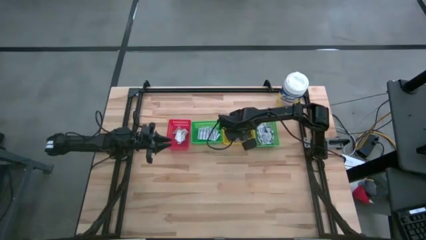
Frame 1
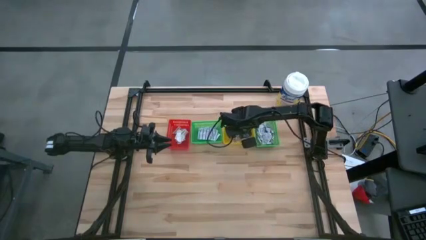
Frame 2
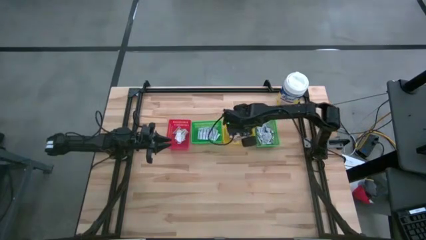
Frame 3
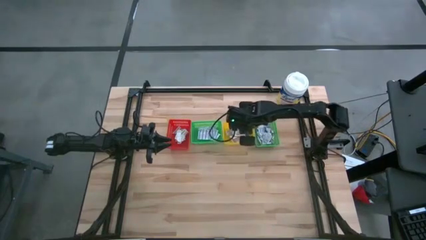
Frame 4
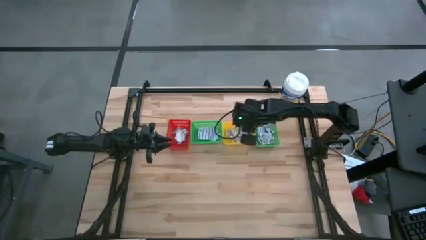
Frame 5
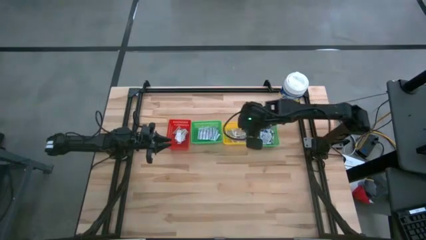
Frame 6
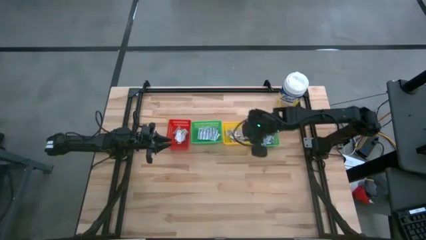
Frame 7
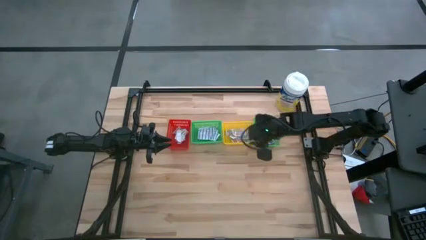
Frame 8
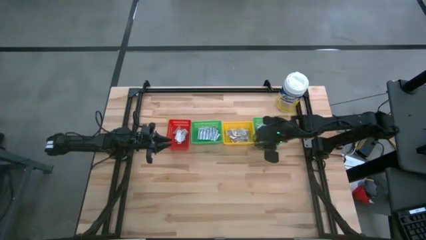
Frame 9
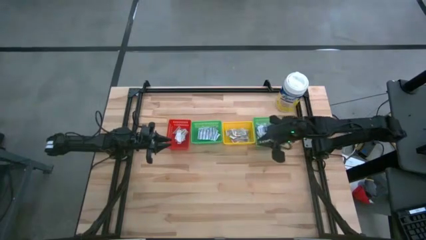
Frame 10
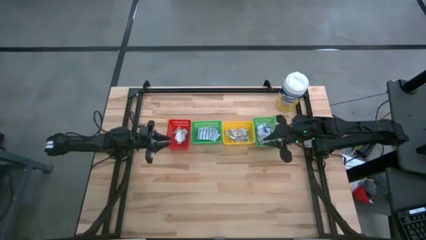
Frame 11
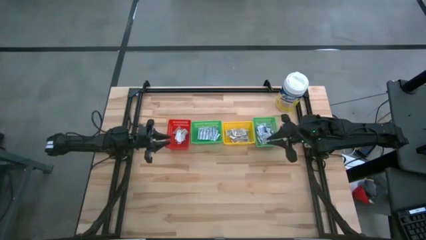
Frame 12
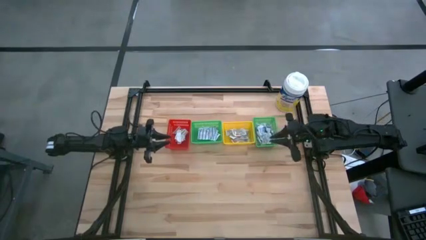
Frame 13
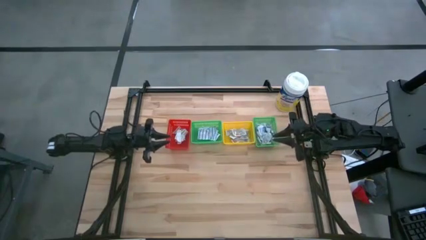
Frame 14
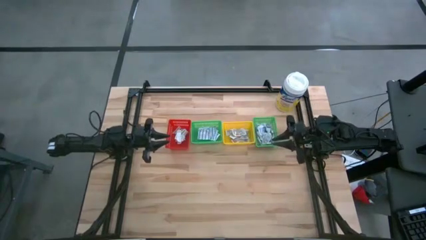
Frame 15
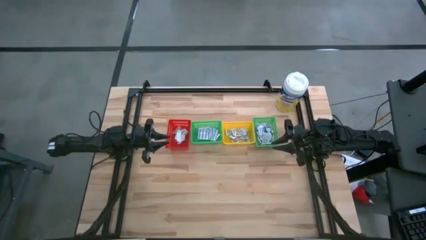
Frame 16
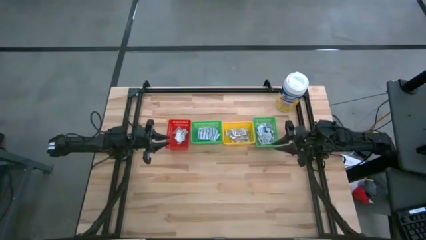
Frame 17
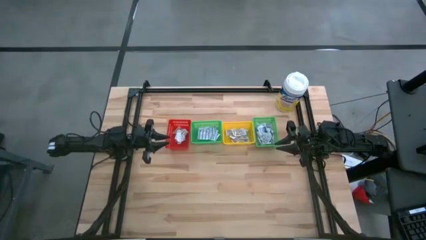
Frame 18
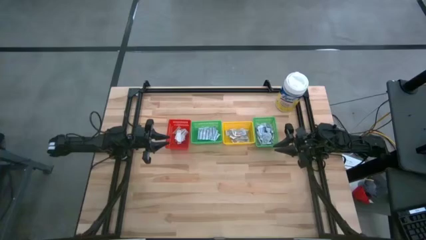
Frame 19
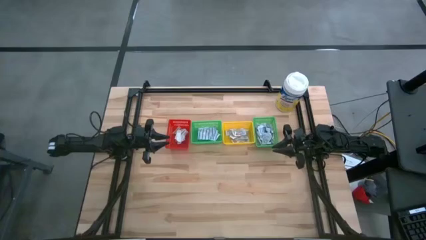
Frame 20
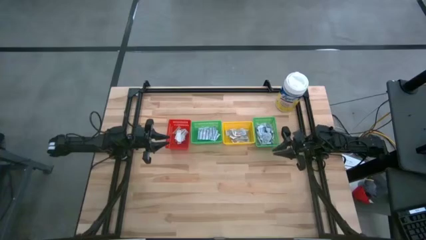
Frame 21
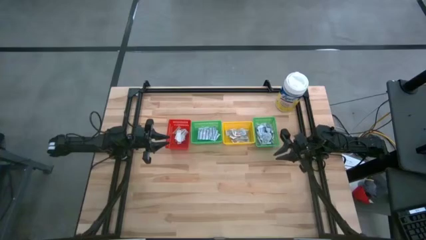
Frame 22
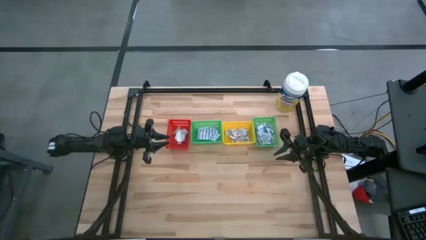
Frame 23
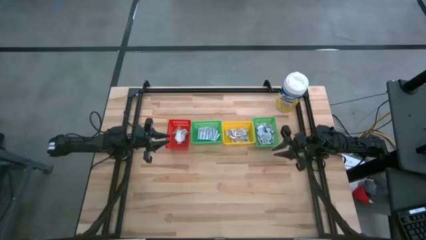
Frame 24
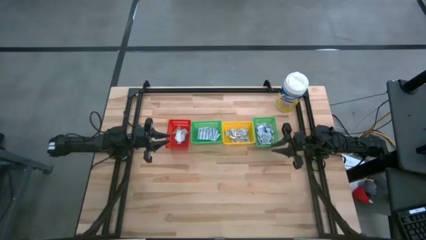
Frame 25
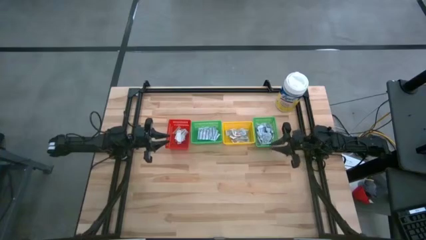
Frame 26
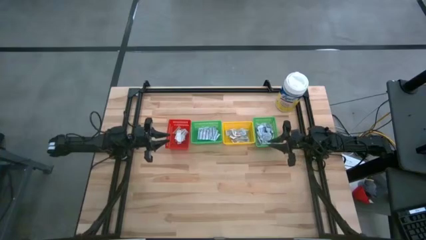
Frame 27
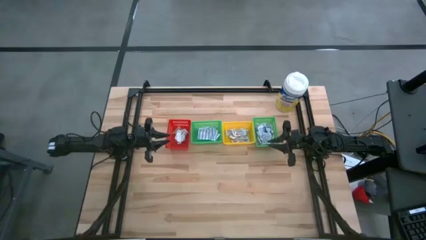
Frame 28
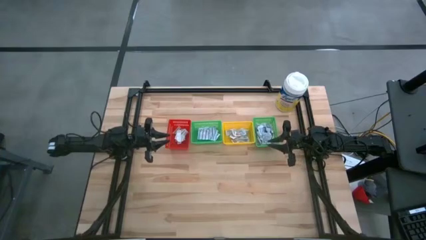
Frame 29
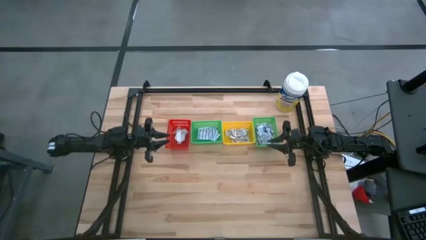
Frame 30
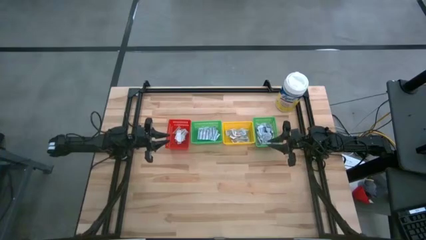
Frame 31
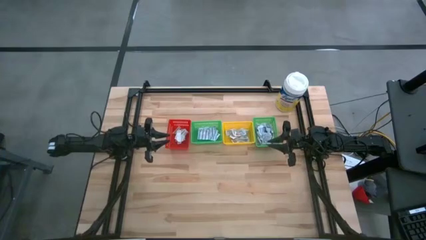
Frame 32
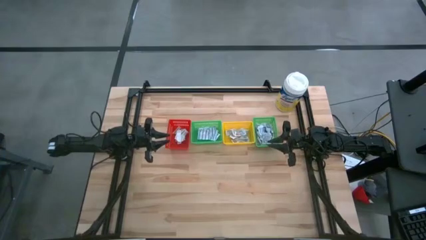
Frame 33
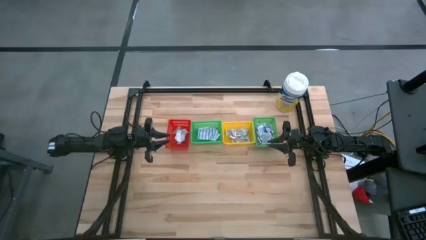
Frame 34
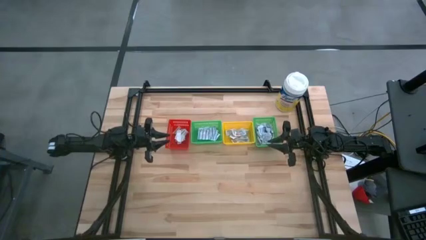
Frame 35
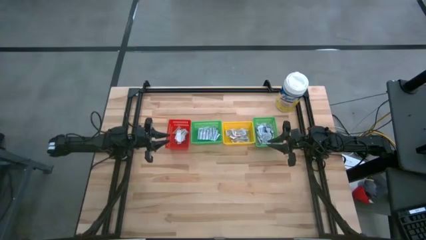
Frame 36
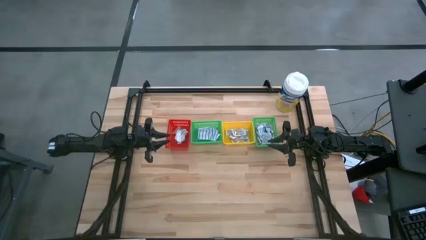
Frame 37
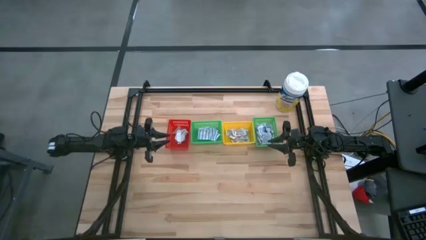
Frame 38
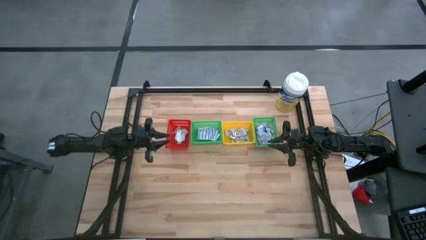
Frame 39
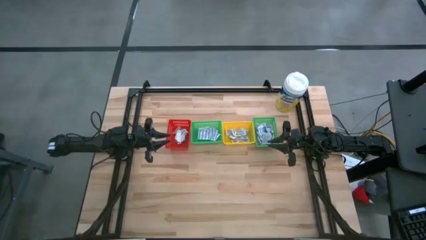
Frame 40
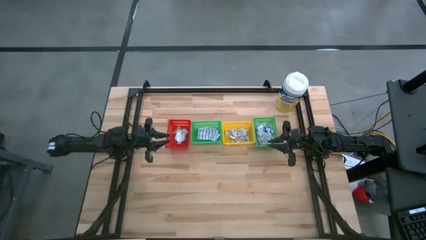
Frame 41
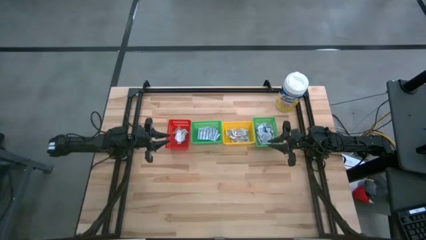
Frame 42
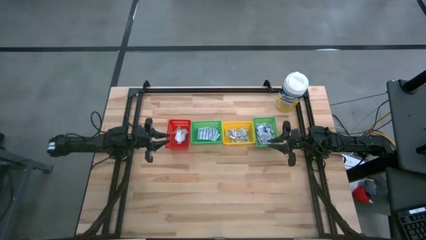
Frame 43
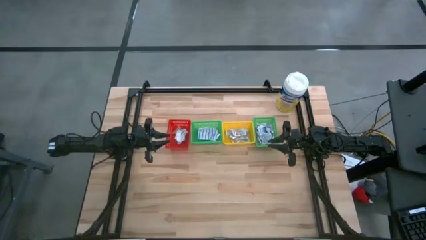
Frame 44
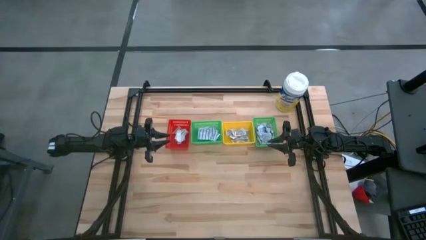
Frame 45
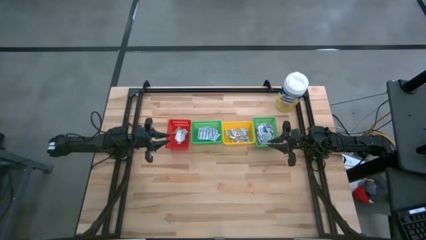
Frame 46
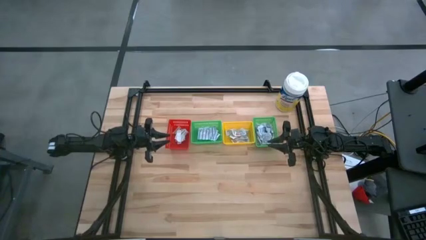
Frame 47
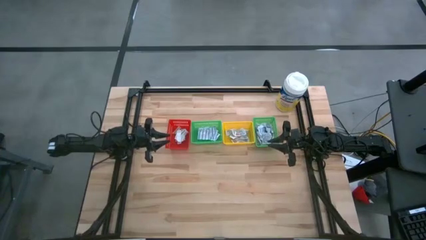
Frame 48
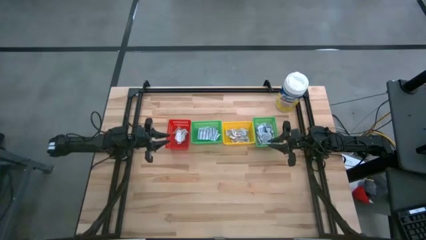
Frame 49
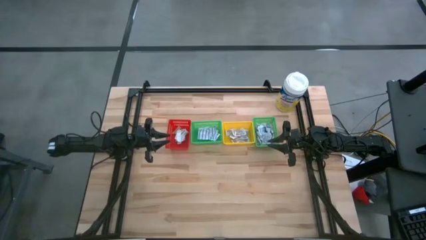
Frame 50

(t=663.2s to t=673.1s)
Task: Pick & Place First Aid Supplies
Return to Home Position
